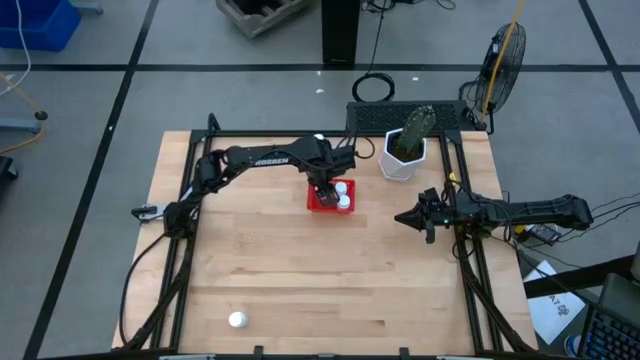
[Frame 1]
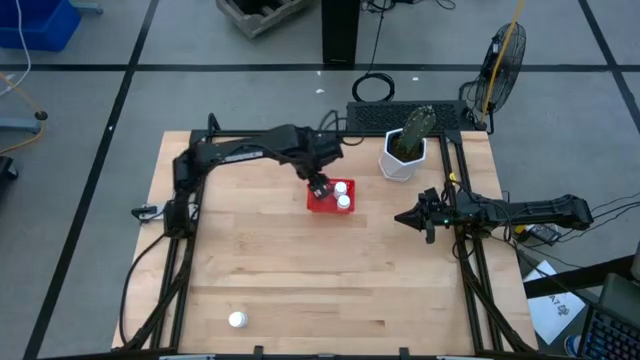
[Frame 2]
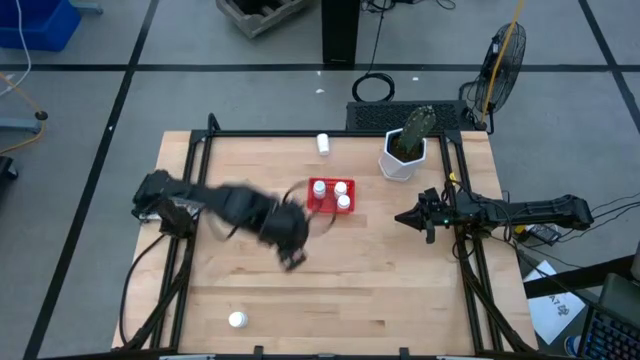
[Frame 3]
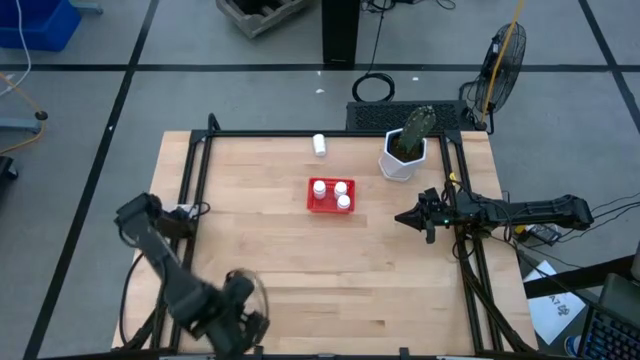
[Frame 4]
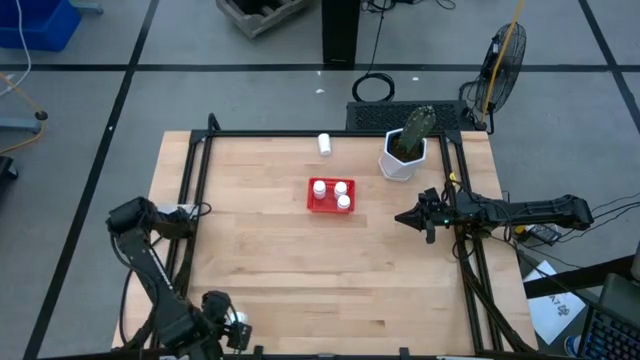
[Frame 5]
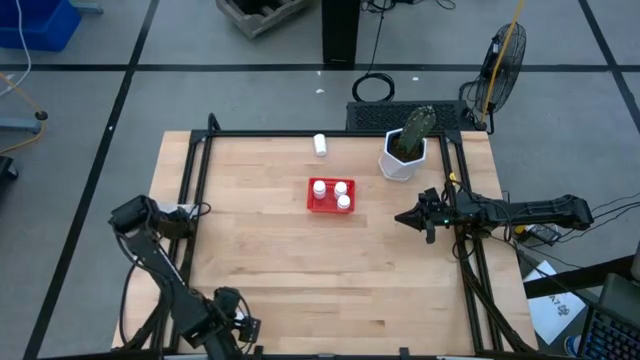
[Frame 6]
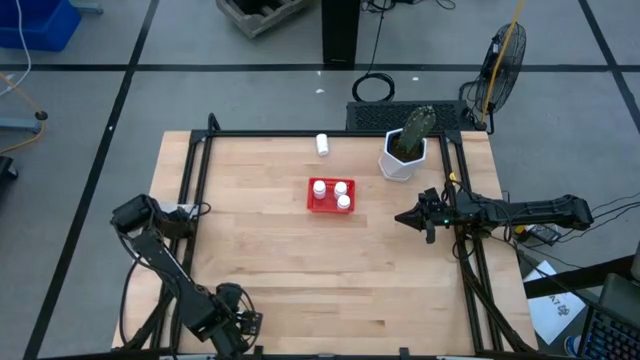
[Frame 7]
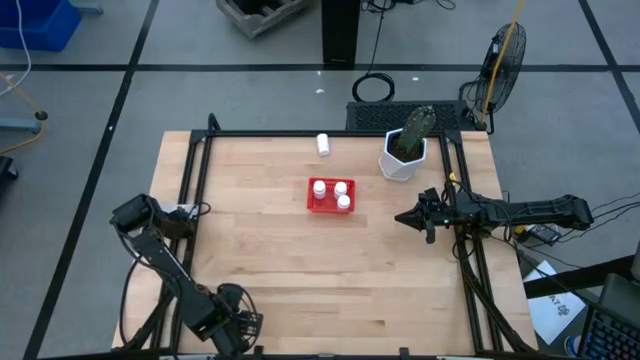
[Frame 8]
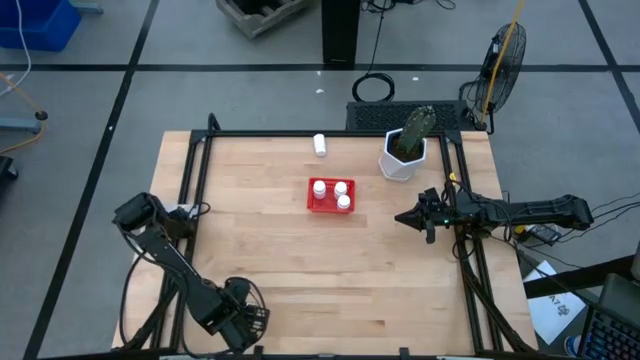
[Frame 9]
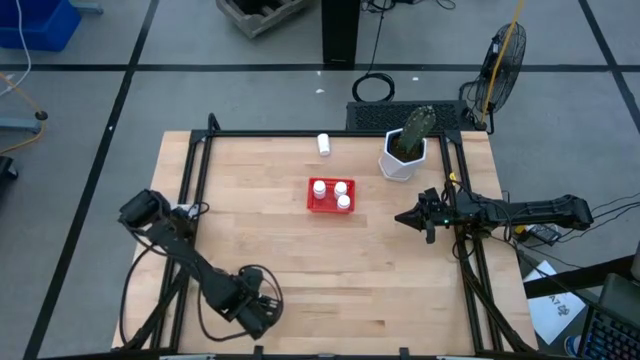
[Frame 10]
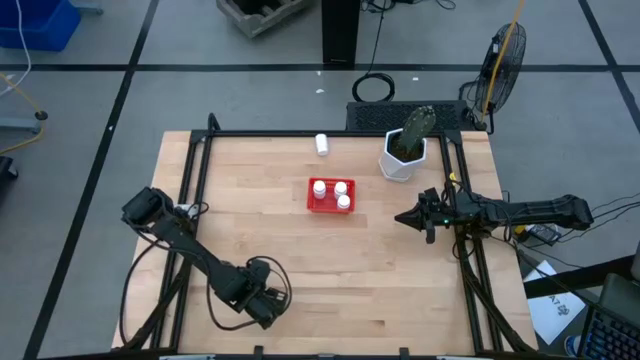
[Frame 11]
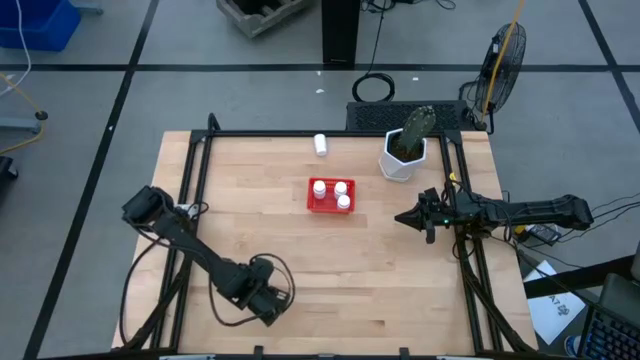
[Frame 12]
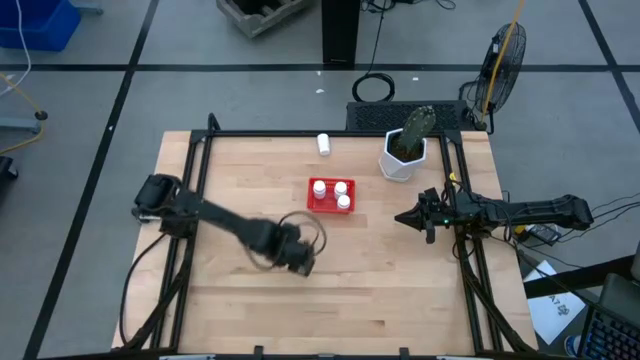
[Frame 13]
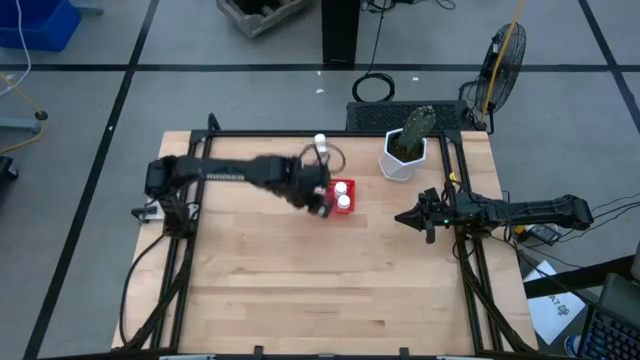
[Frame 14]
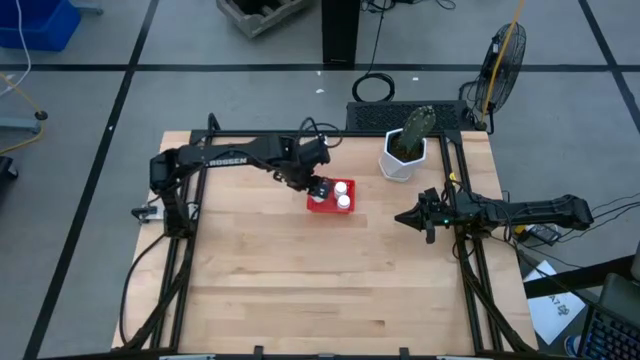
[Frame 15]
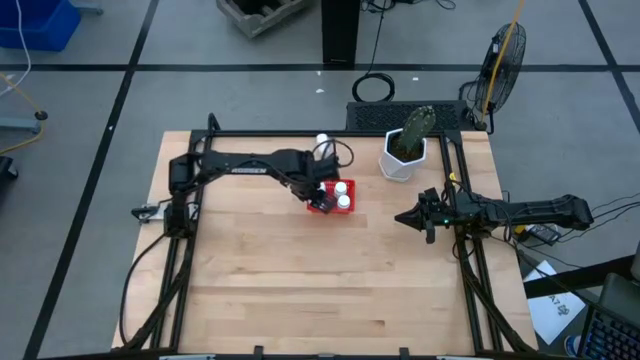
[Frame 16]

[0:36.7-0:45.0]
Task: Pick and place pill bottles into a basket
Put the white medicine bottle into the red basket

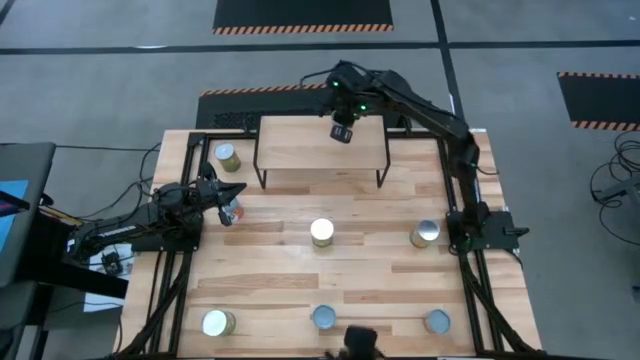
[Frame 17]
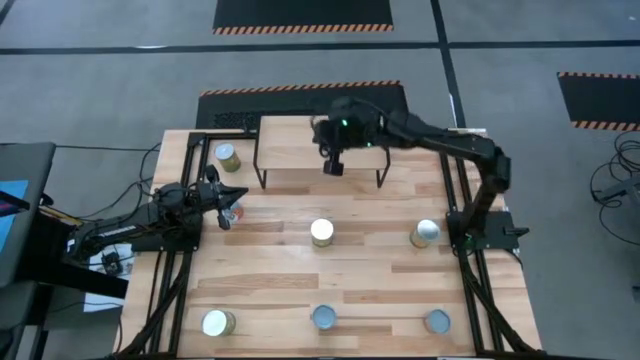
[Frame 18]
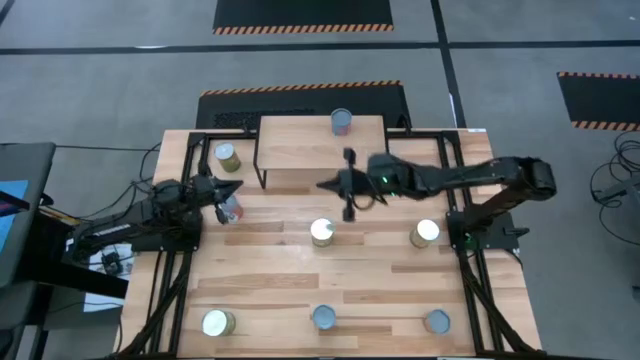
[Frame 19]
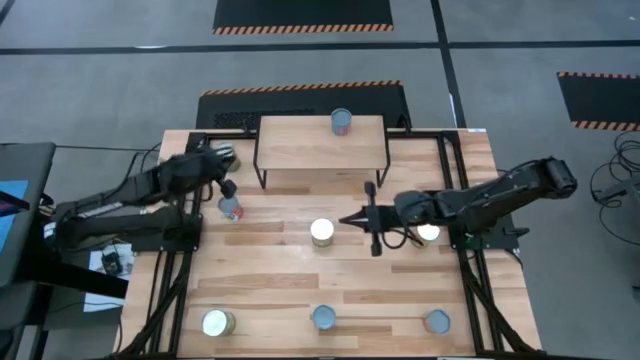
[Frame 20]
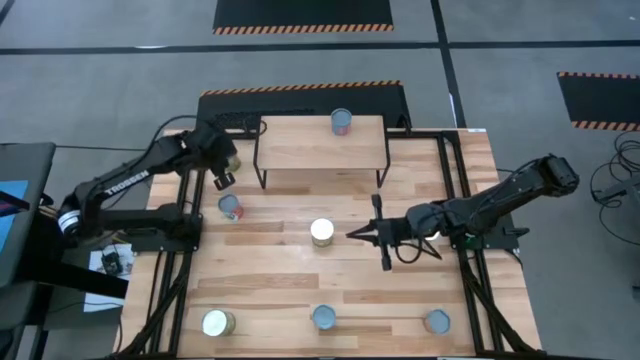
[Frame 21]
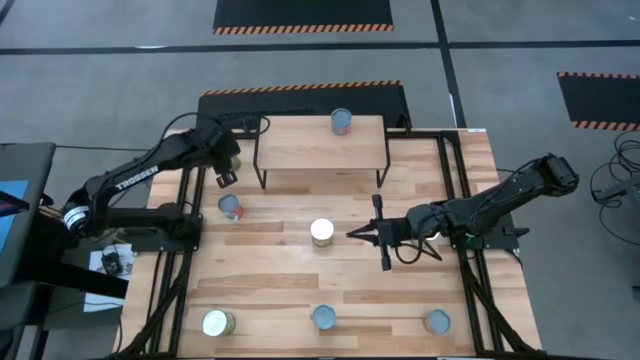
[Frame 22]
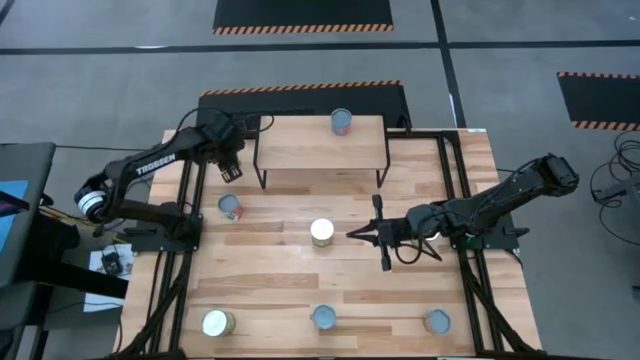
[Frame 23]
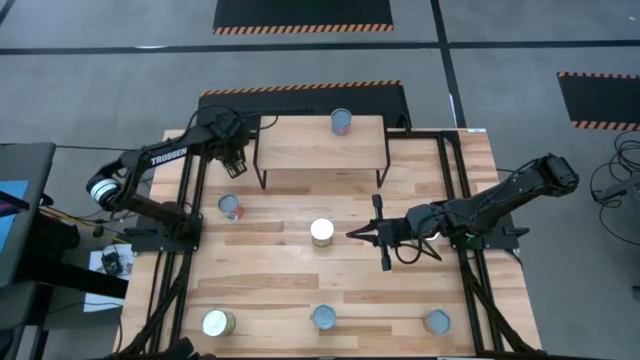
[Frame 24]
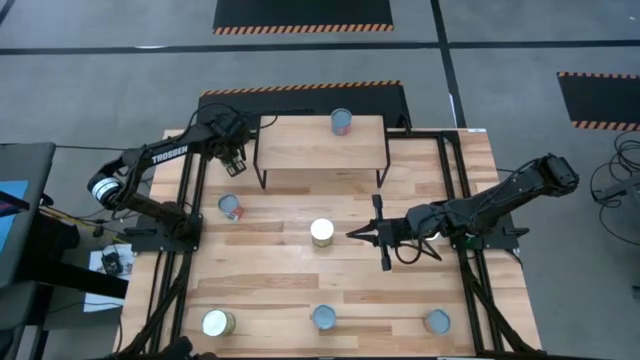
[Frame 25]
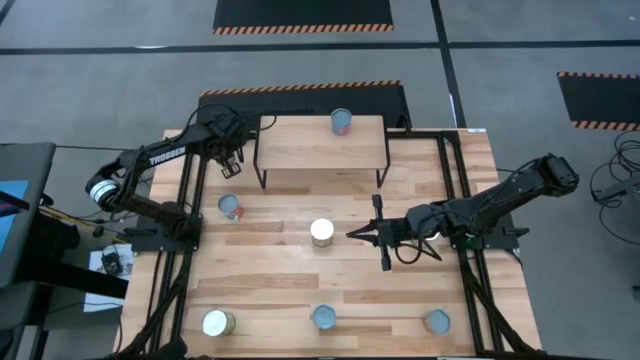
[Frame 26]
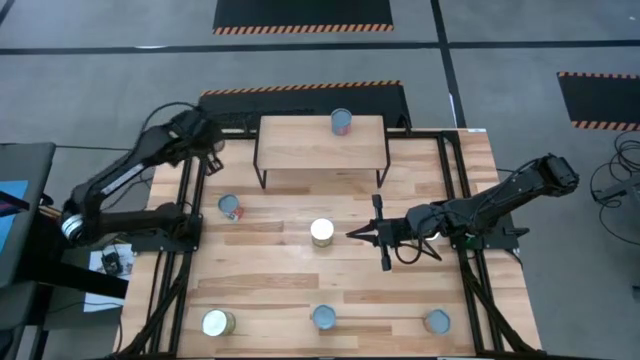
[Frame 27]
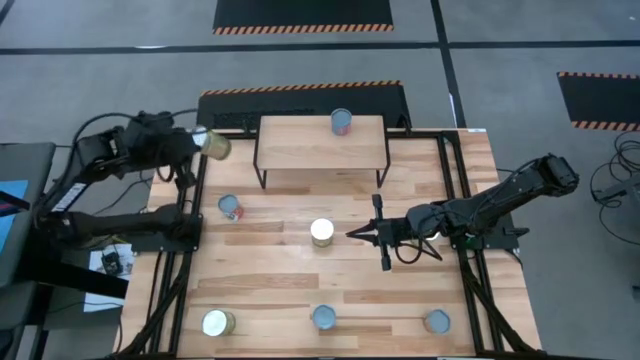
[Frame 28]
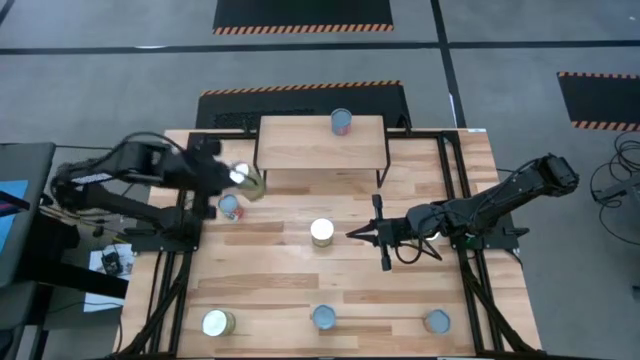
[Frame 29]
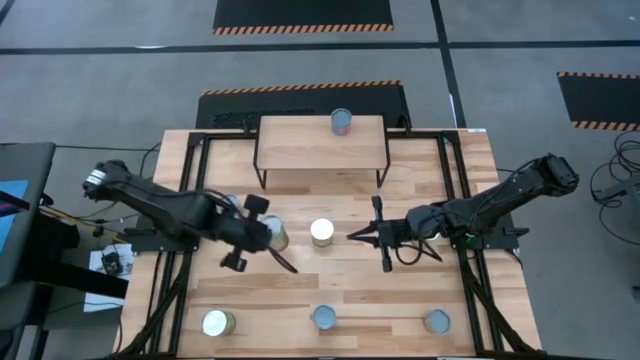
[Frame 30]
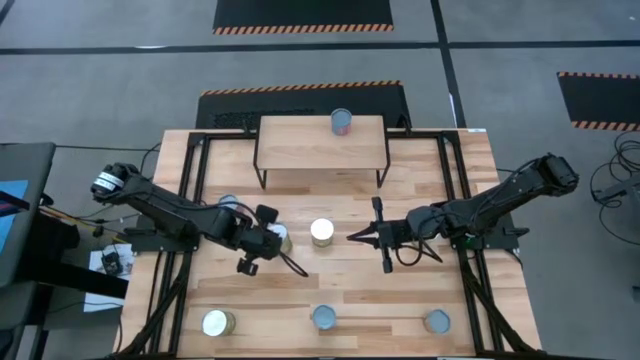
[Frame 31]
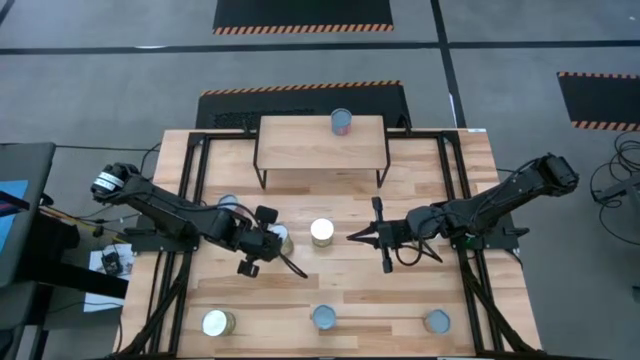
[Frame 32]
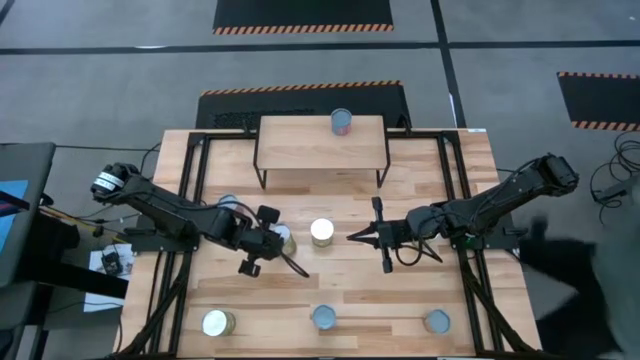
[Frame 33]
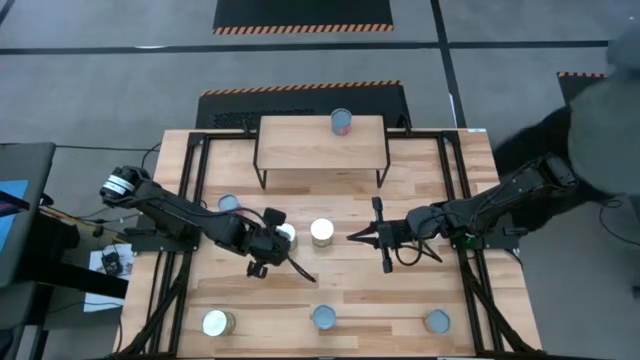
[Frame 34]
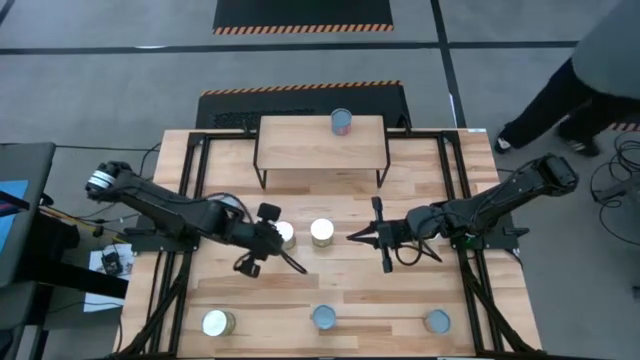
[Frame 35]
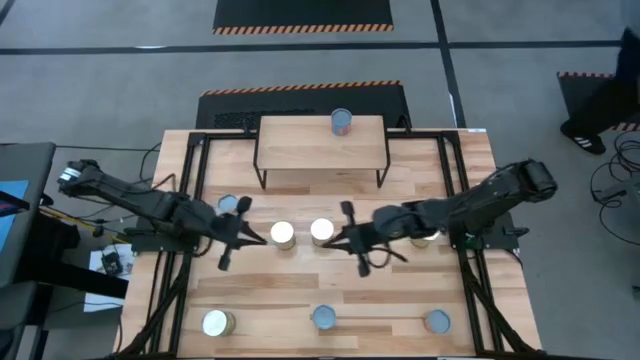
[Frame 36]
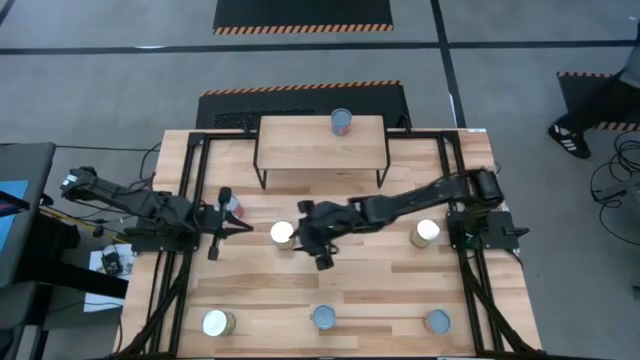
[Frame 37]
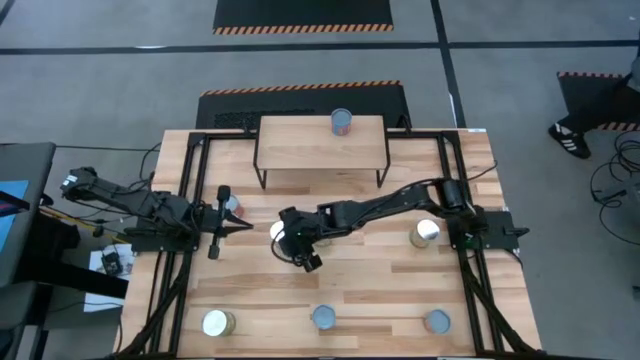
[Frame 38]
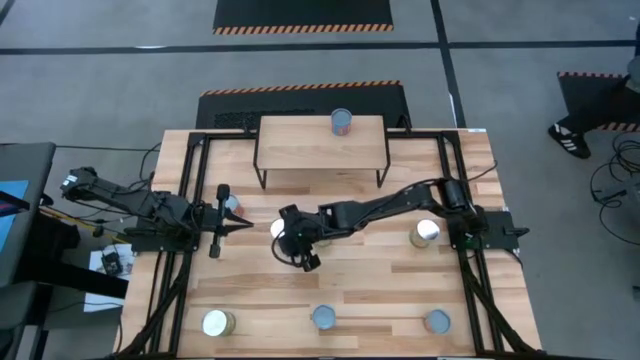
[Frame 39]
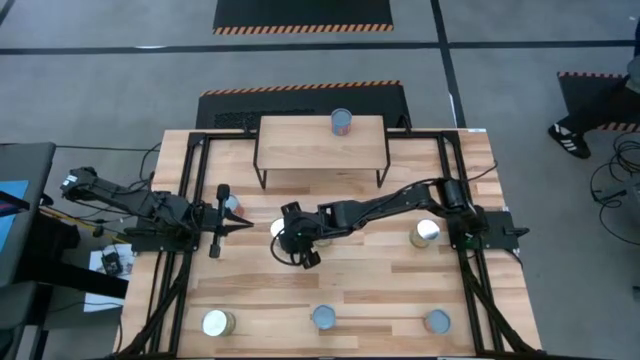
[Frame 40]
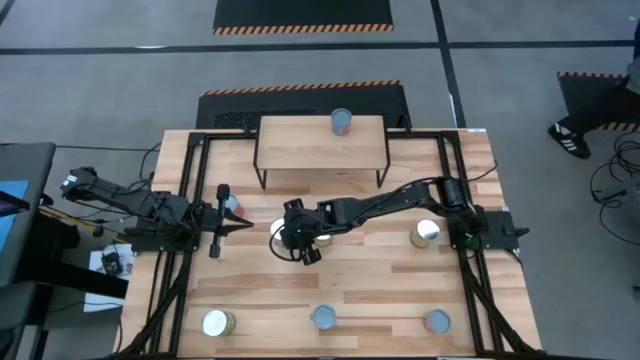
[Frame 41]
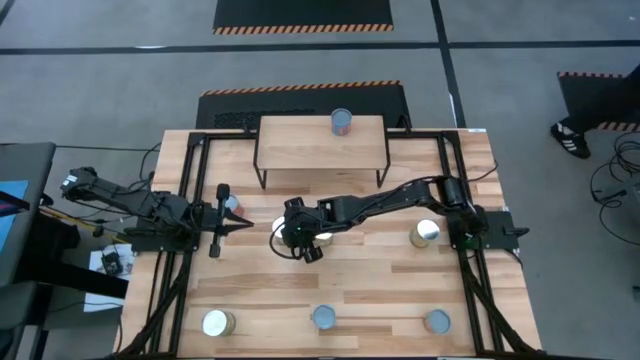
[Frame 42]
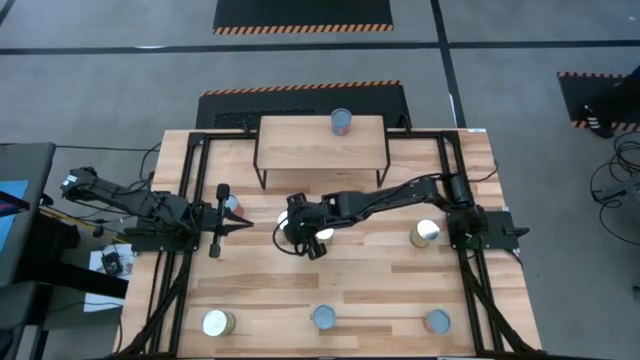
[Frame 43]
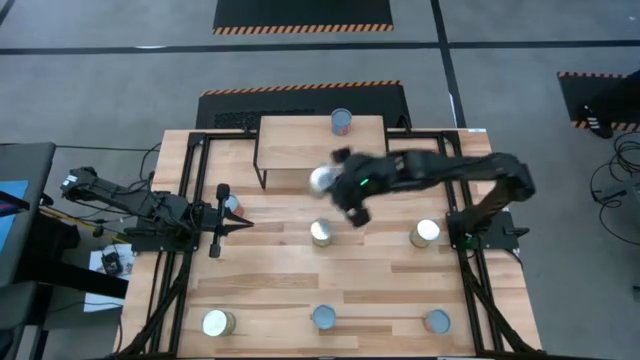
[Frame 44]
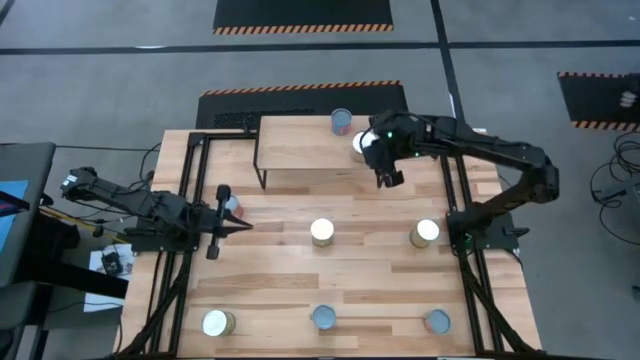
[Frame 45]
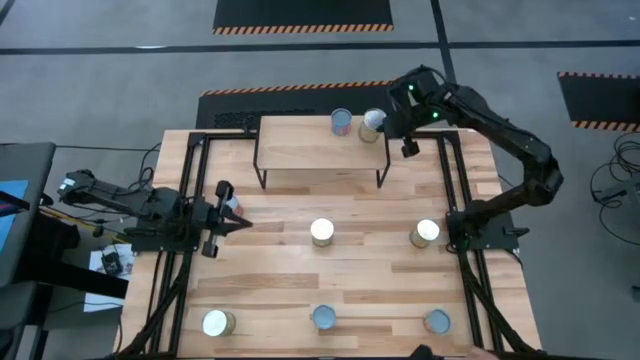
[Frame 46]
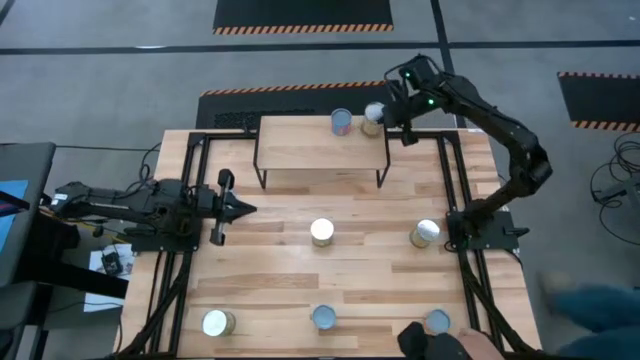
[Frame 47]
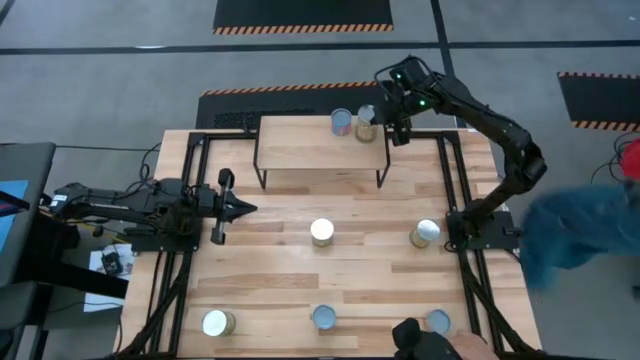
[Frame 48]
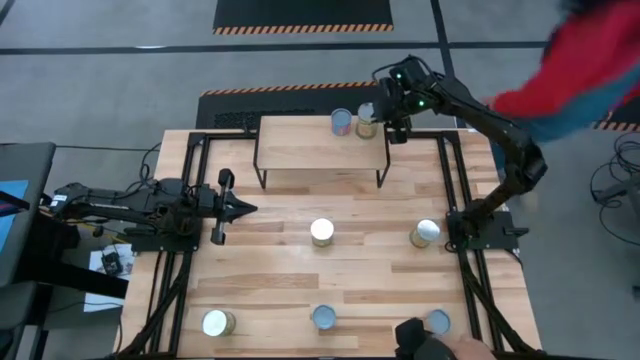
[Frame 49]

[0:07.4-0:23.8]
Task: Pick and place cans onto a shelf
Put the top left green large can on the shelf
